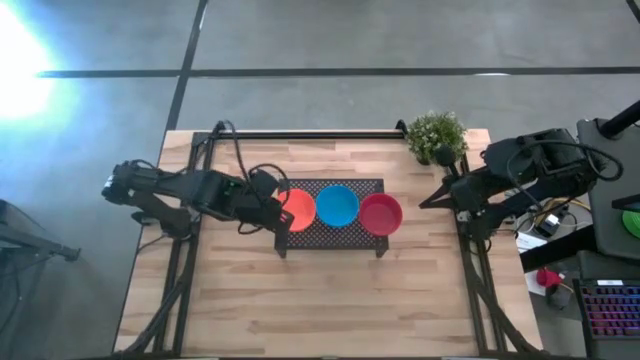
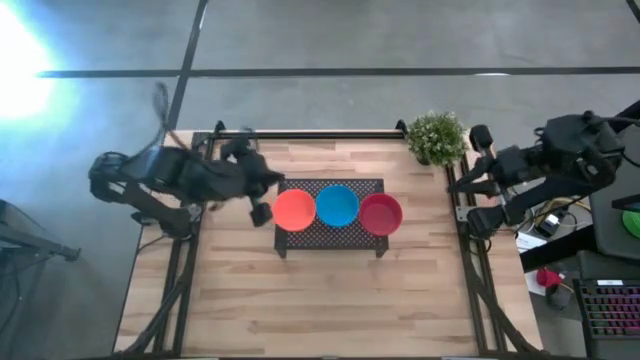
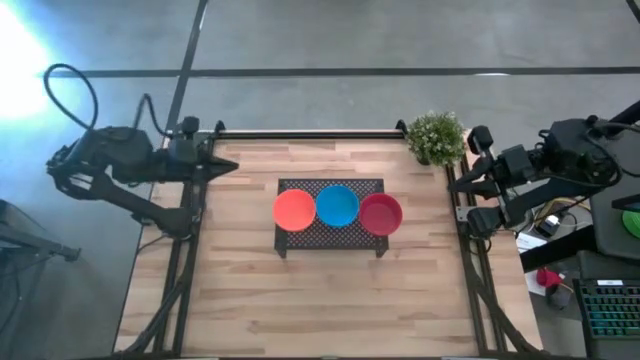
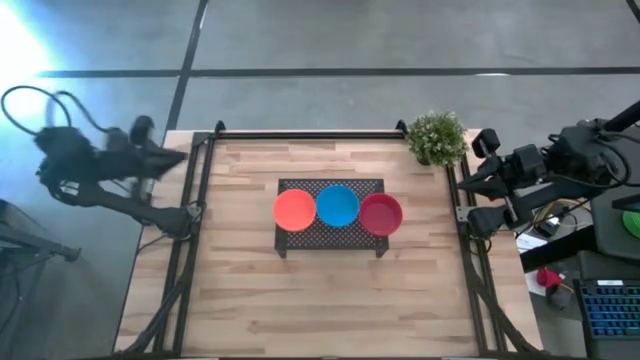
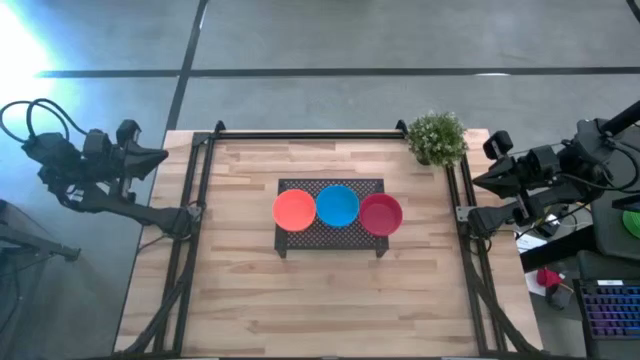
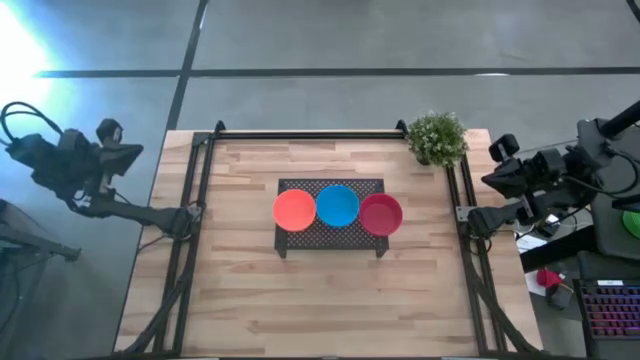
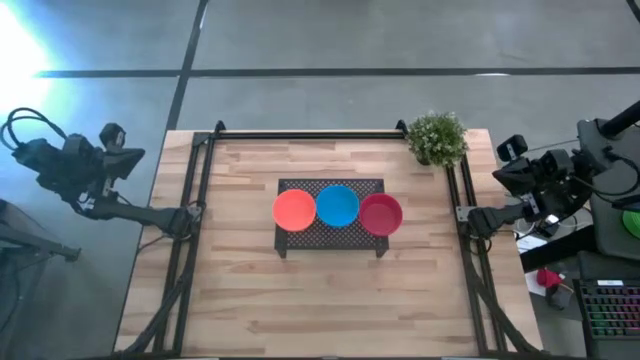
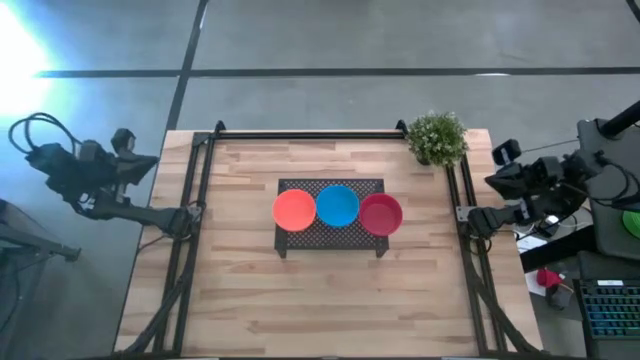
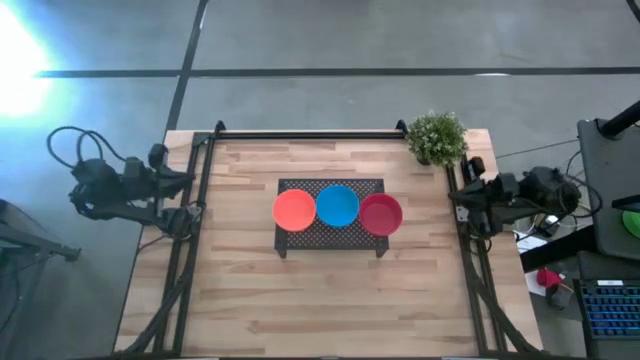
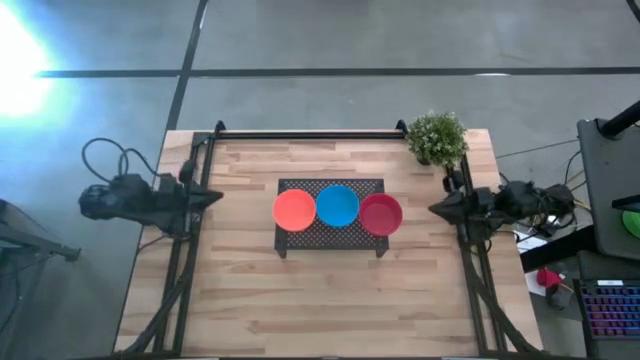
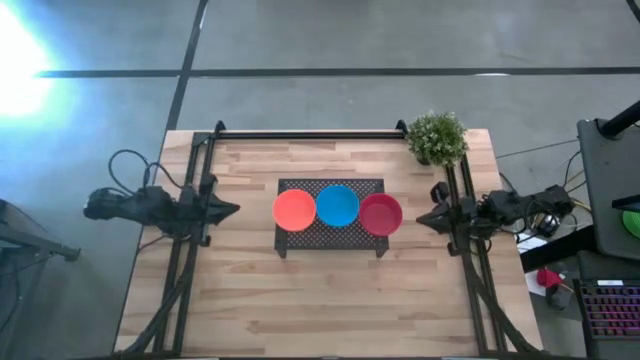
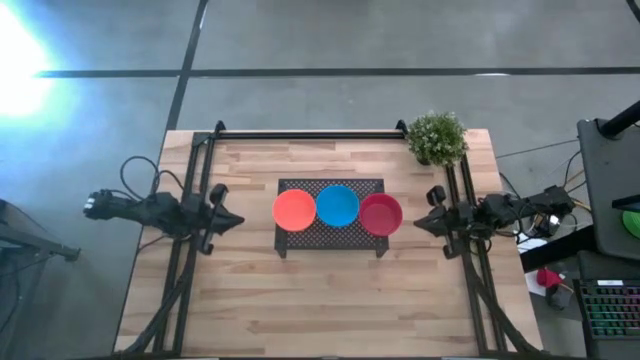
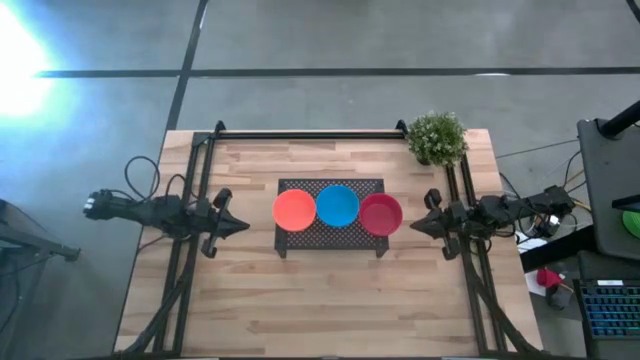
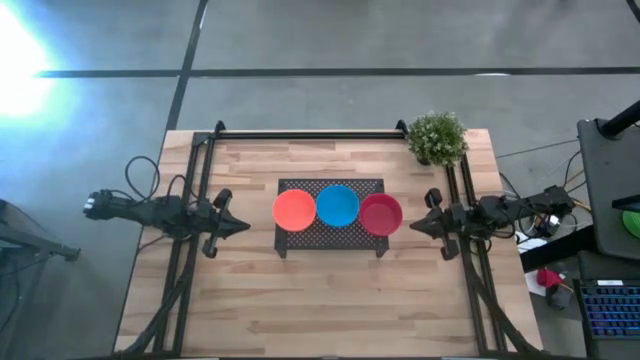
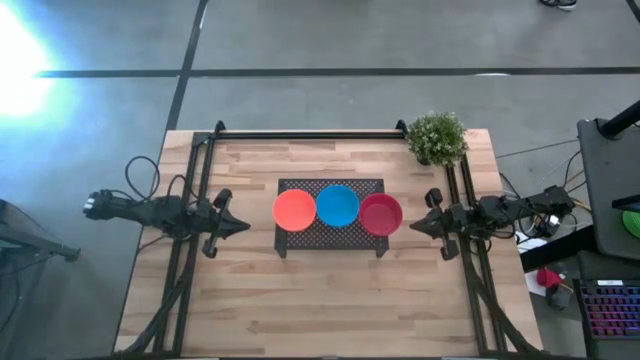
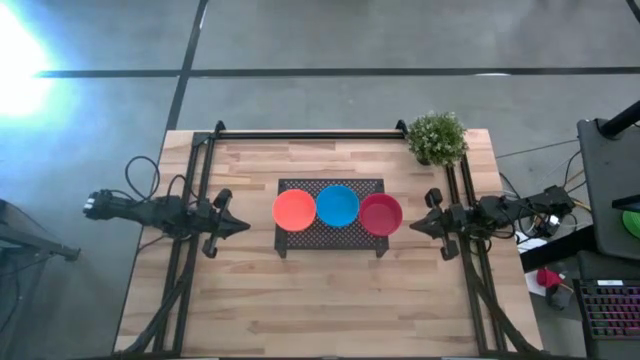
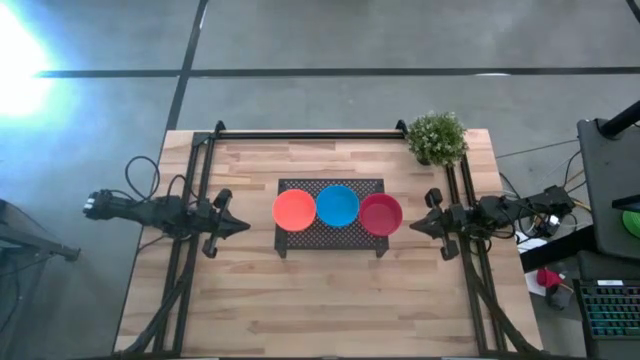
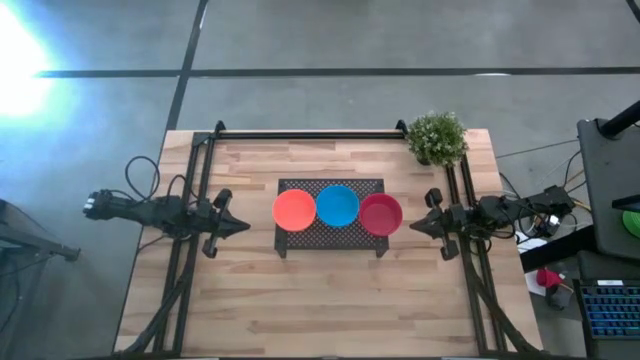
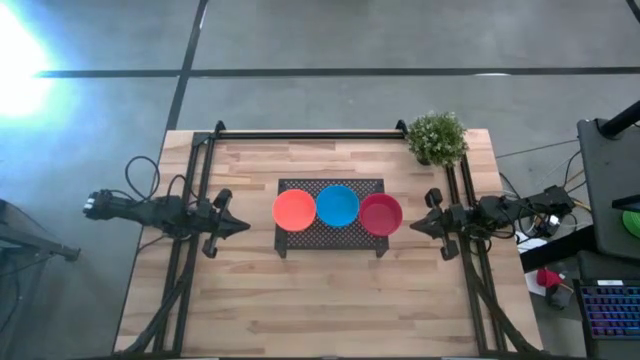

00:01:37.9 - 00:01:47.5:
Task: Pick & Place Mini bowls
Return to Home Position

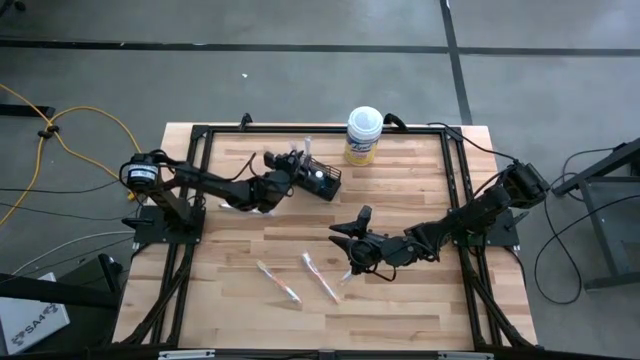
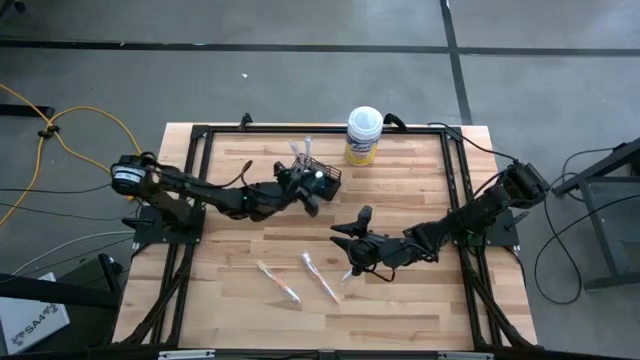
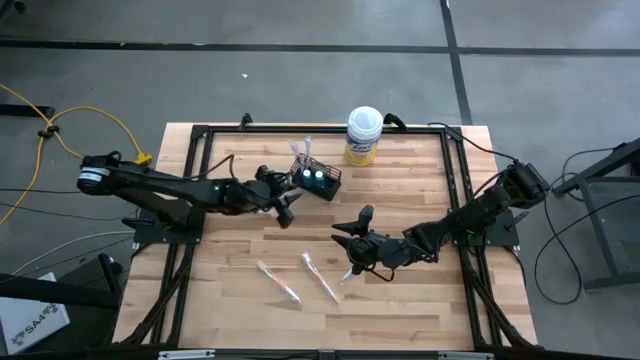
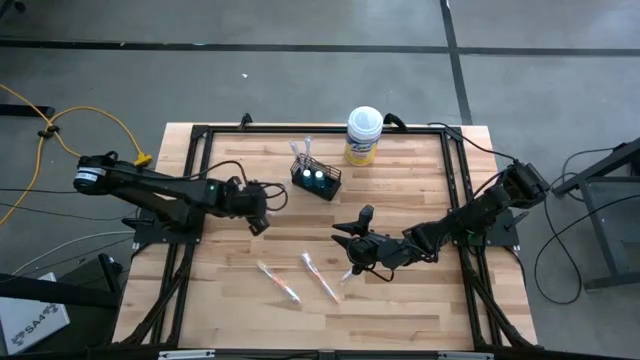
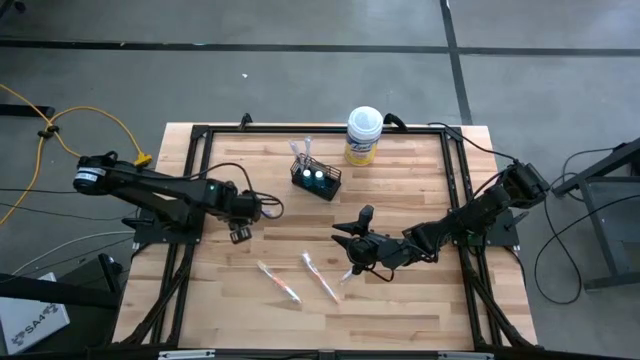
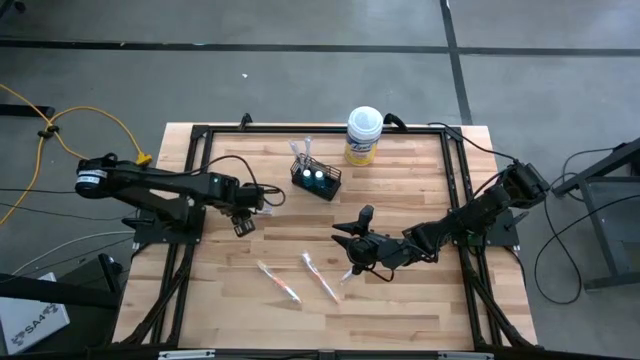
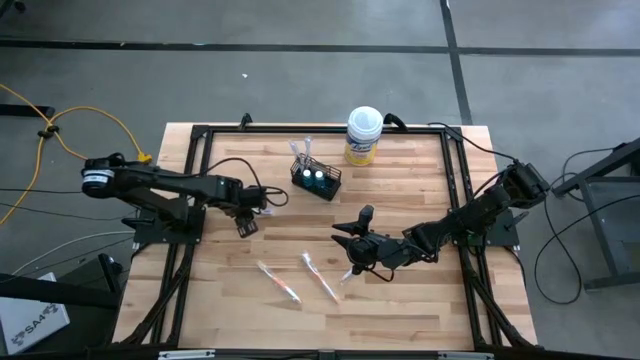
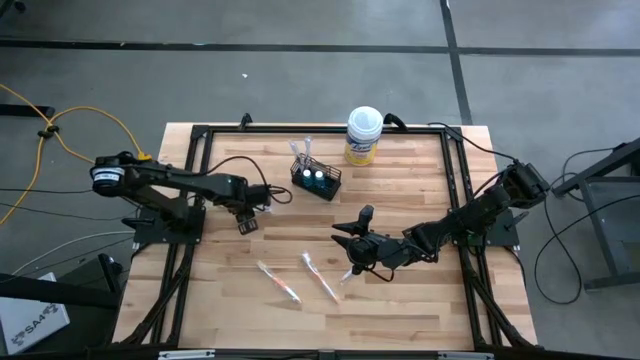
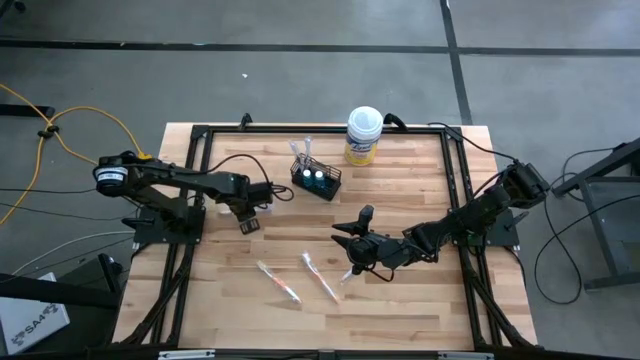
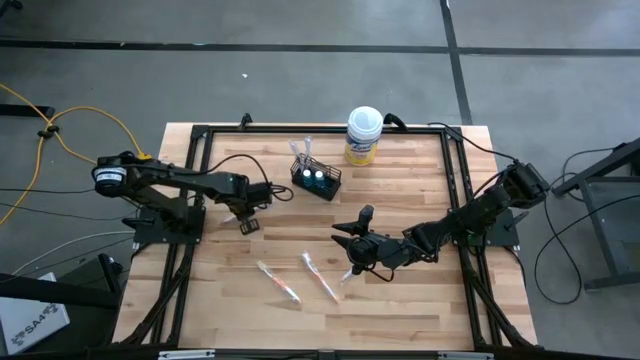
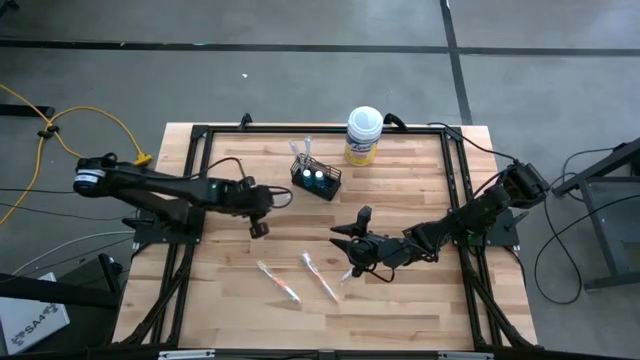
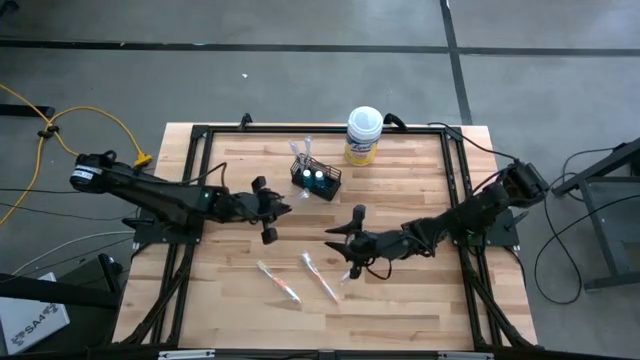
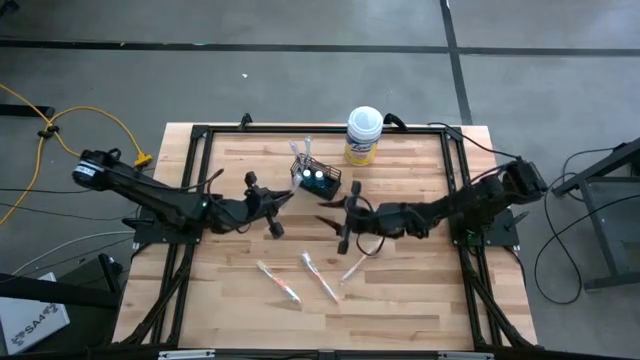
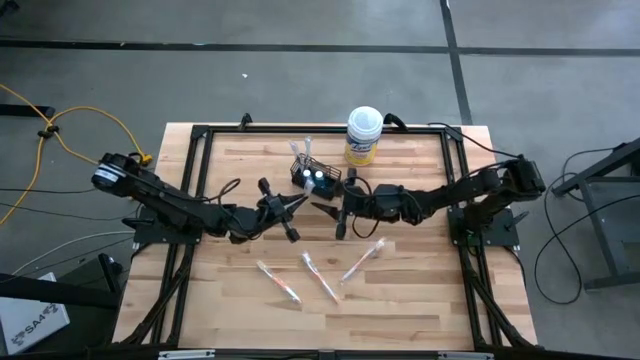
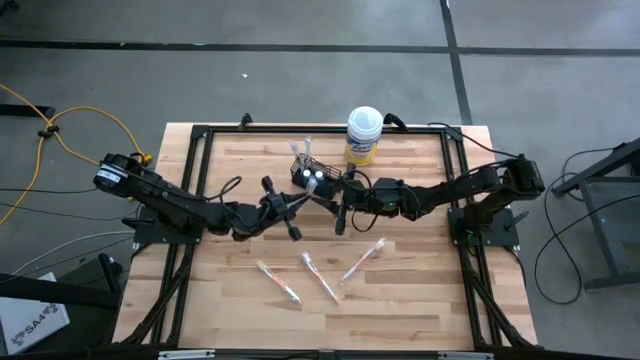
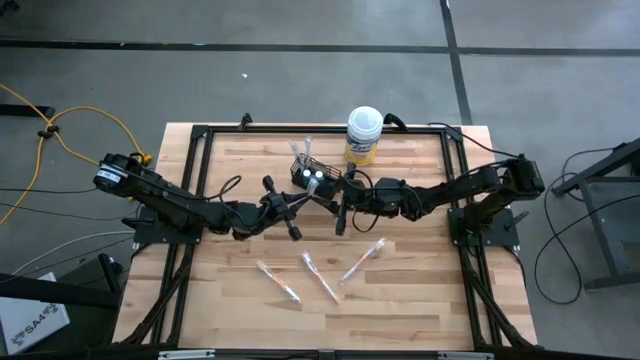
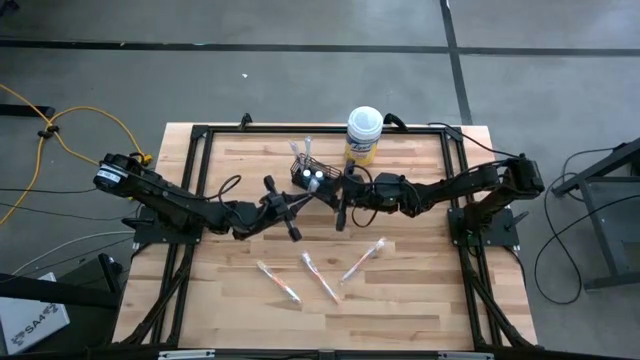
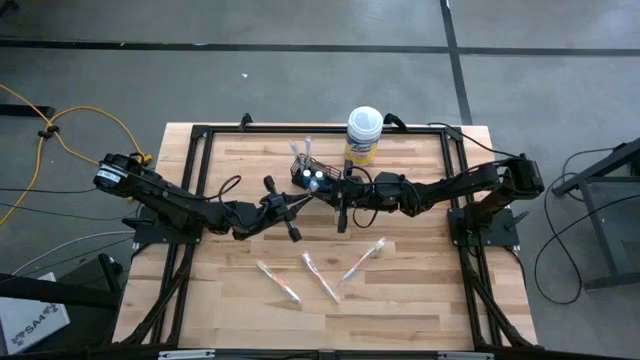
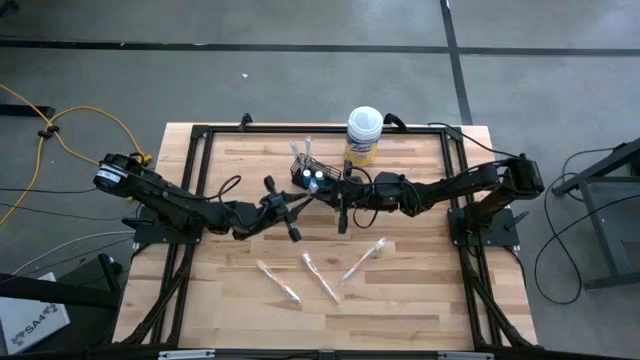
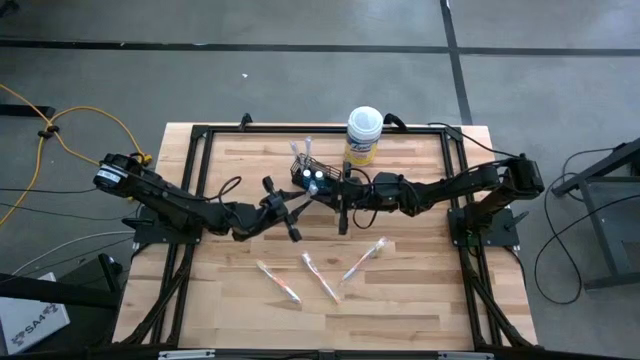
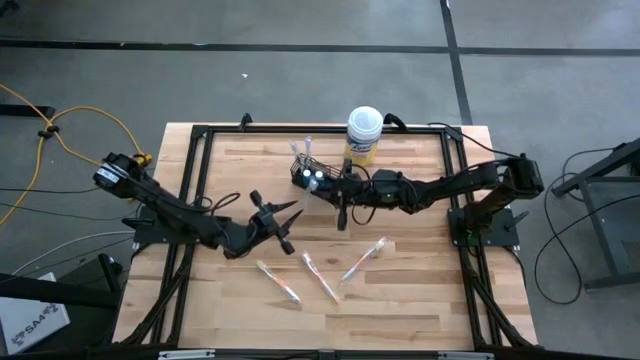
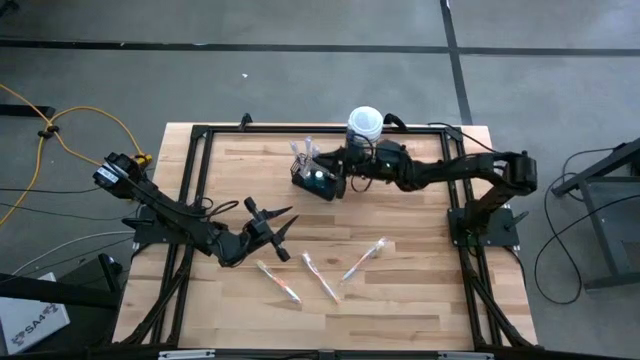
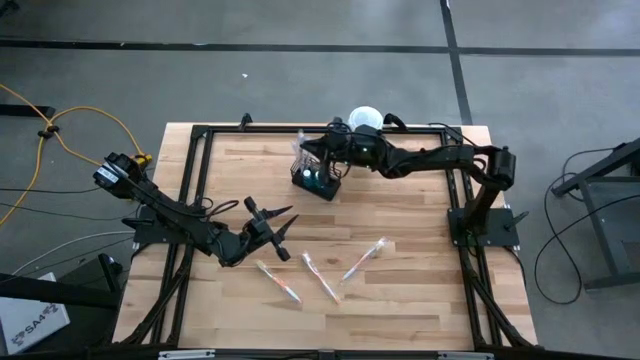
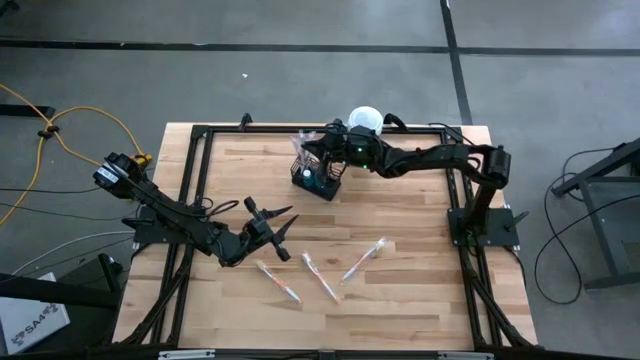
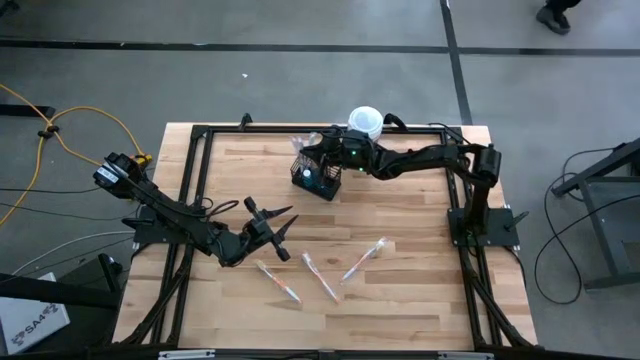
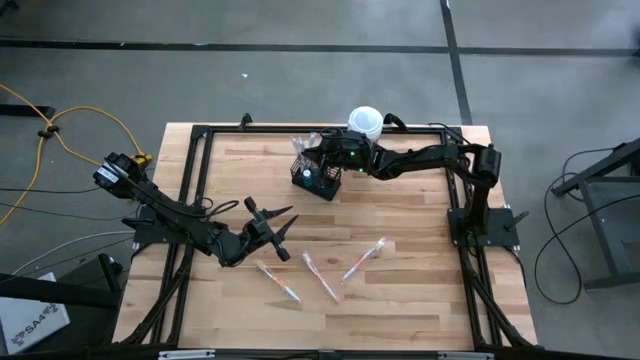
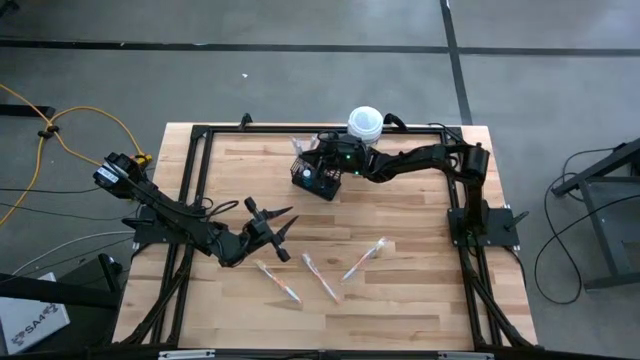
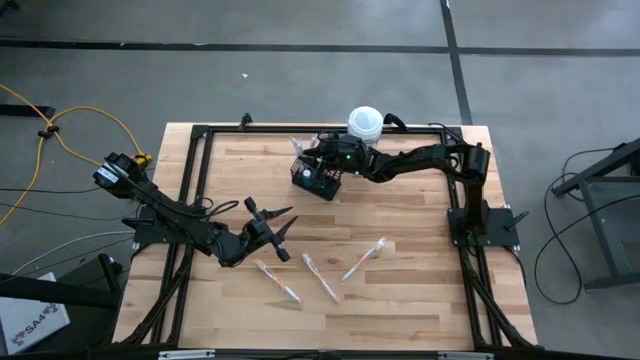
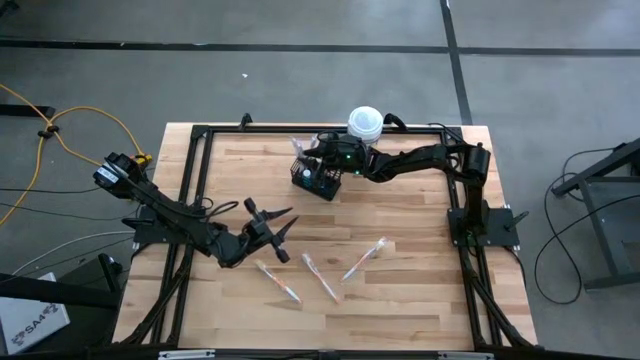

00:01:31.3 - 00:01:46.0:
Task: Pick & Place toothbrushing station
Put the violet toothbrush into the black mesh organizer
